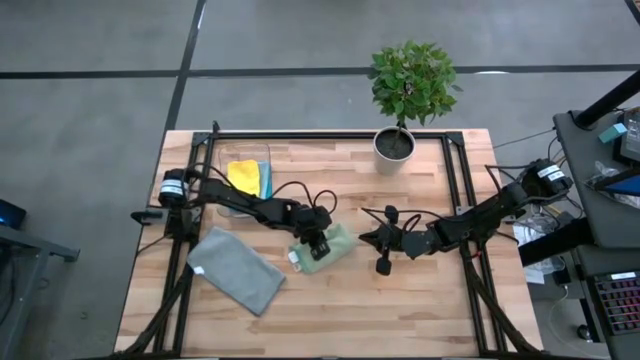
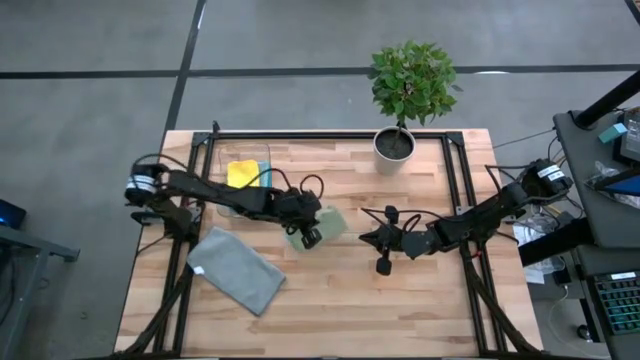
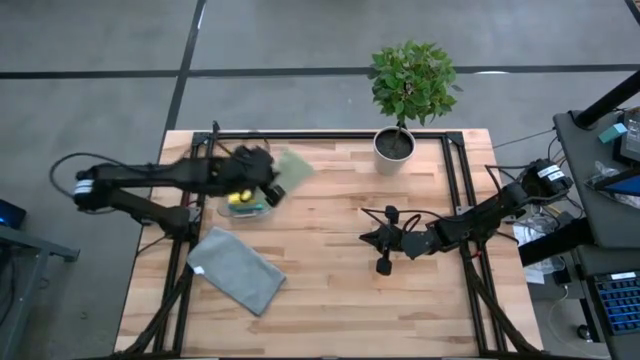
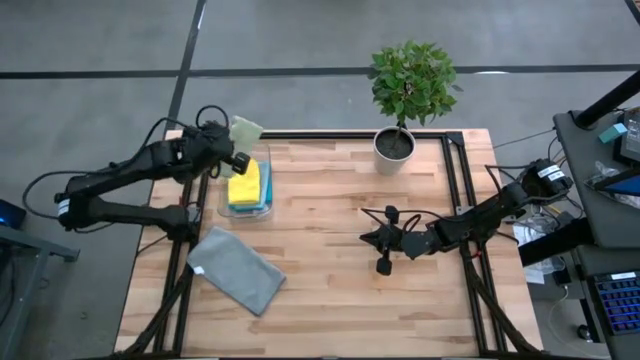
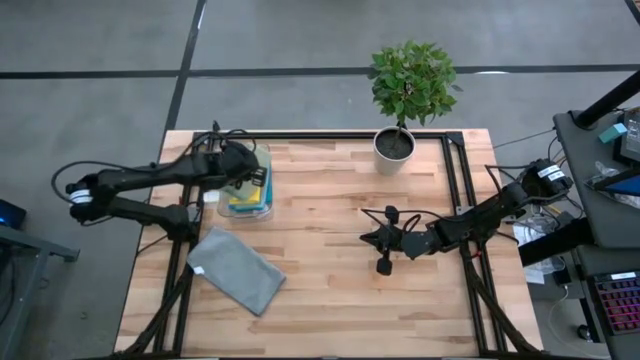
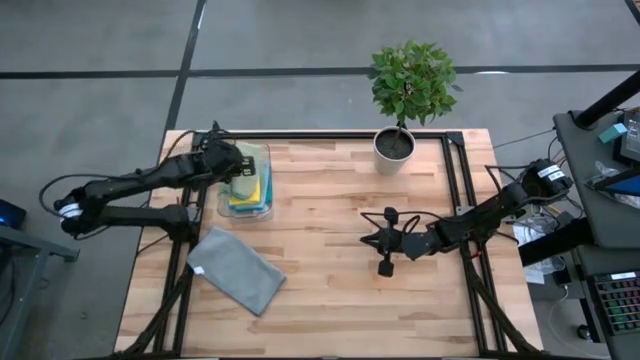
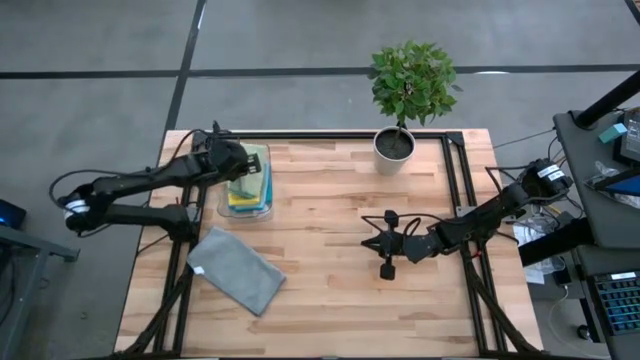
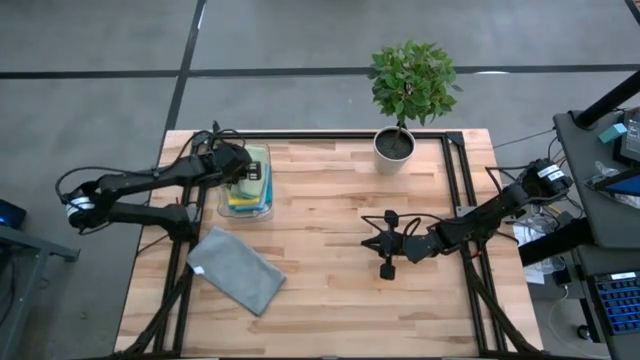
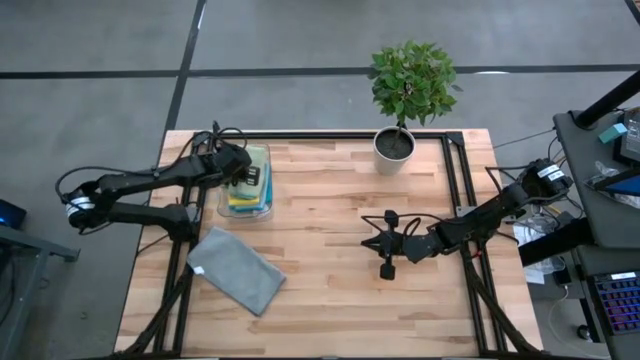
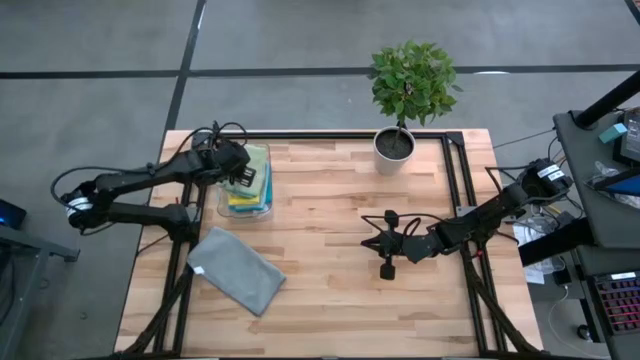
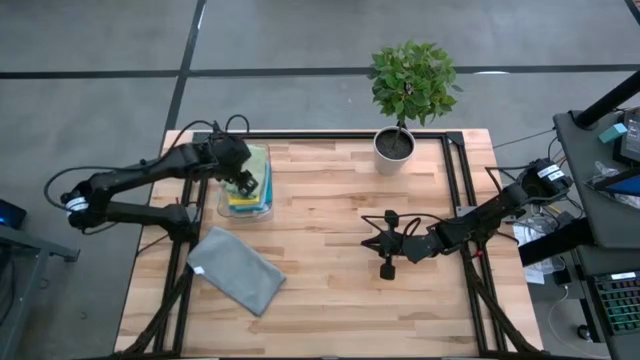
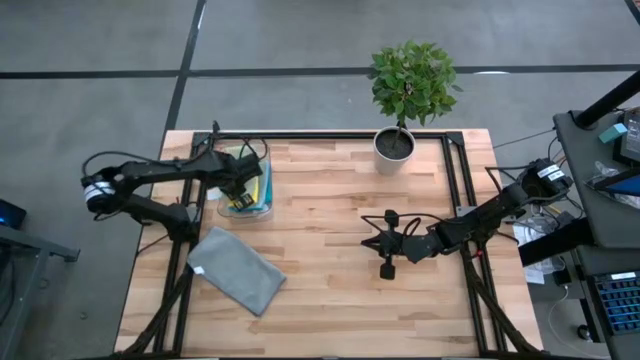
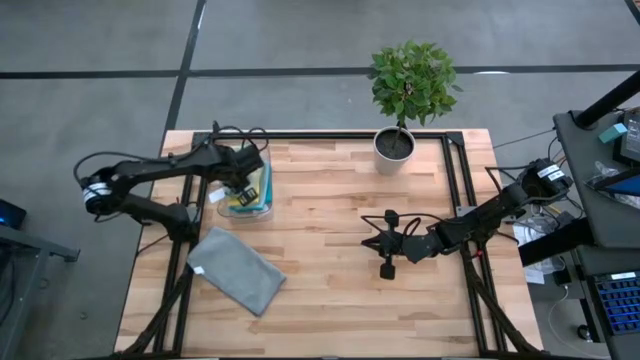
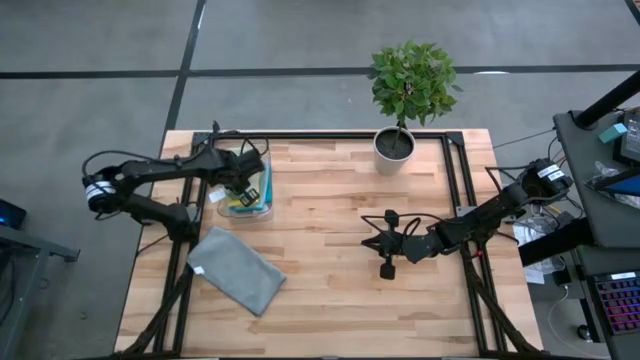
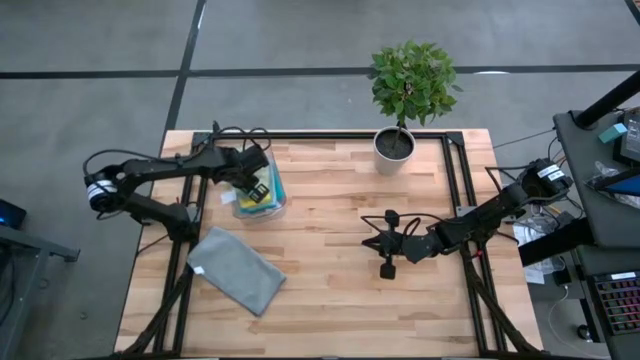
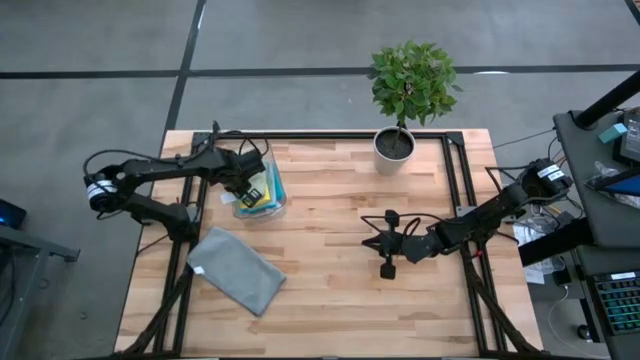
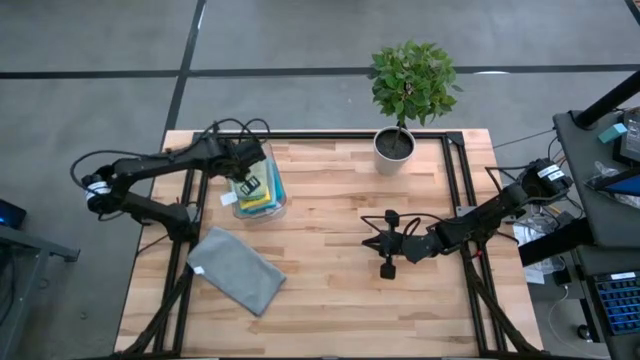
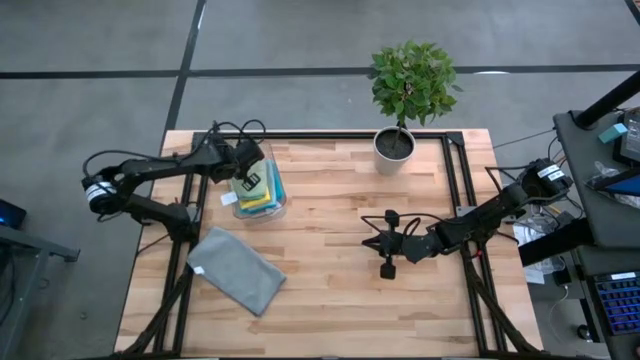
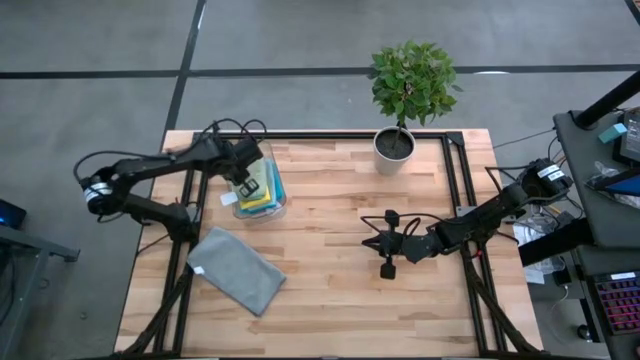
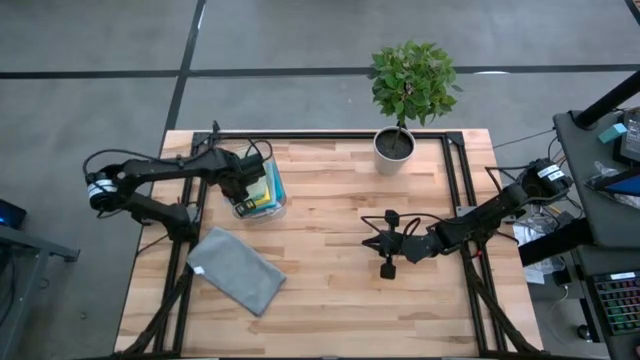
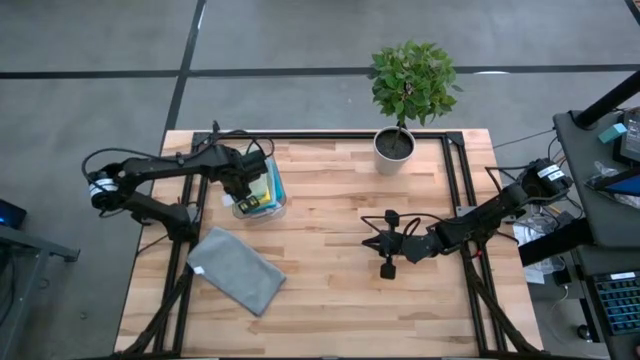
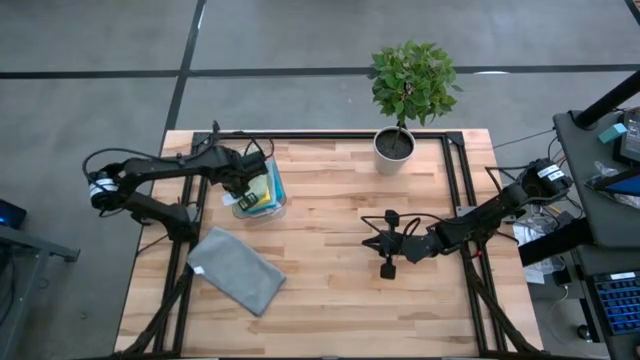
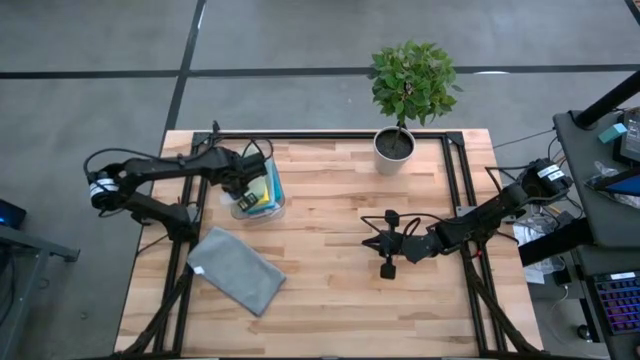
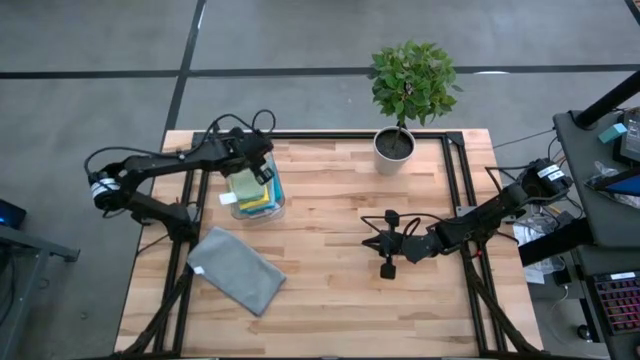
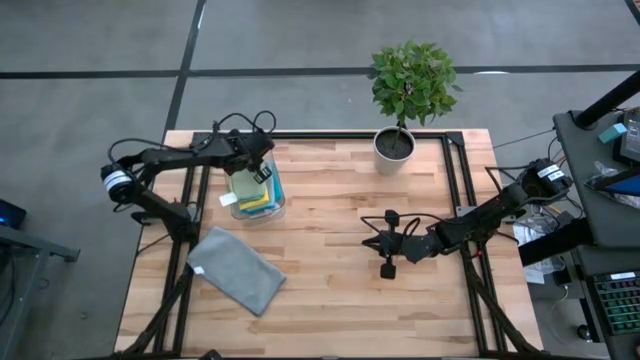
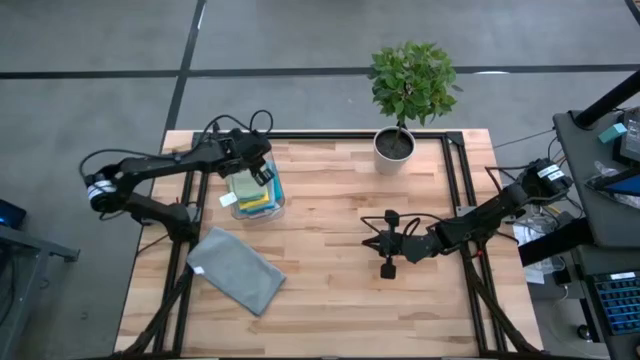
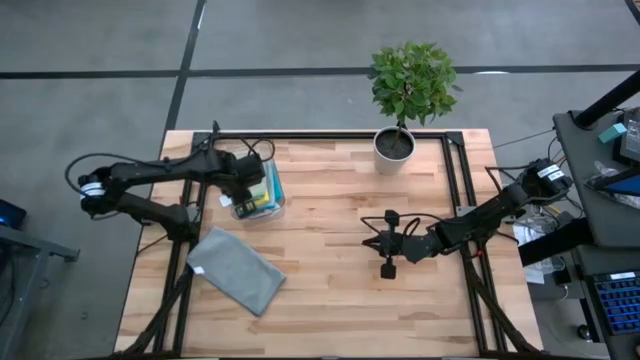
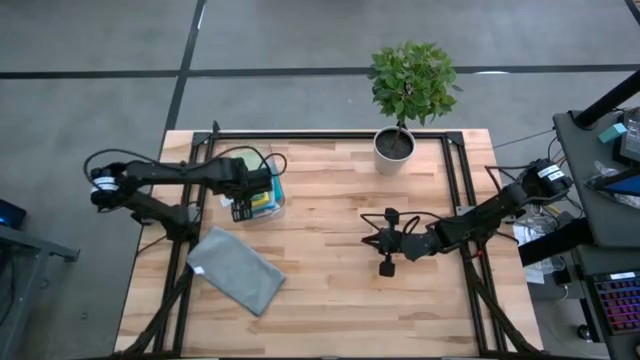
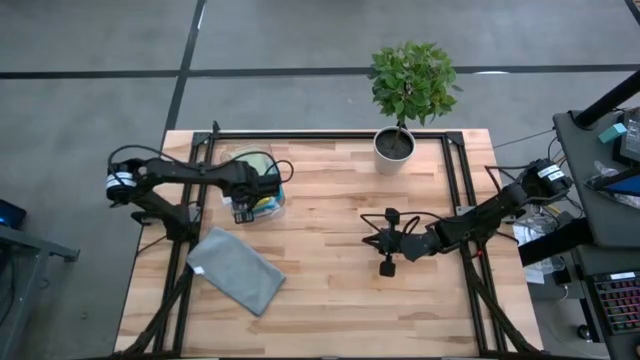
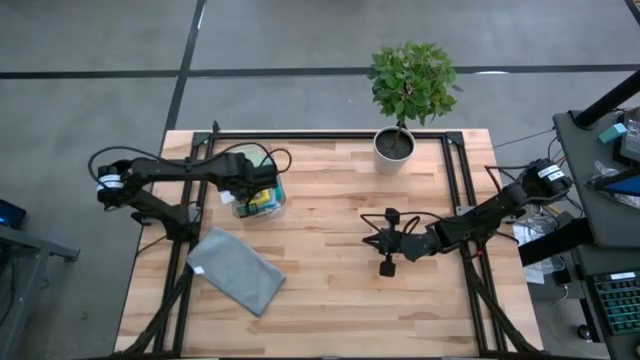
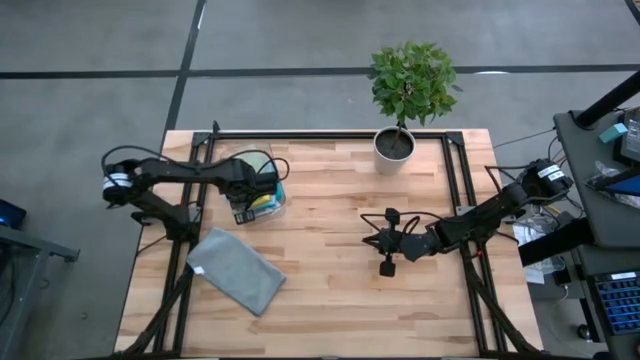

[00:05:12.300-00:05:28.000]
Task: Fold microfiber towels
Stack the folded light green microfiber towel on top of the yellow microfiber towel on the bin

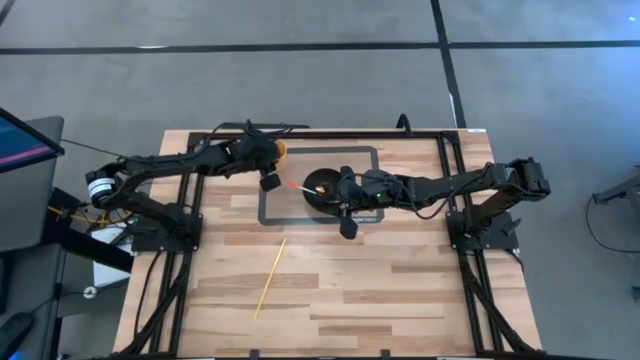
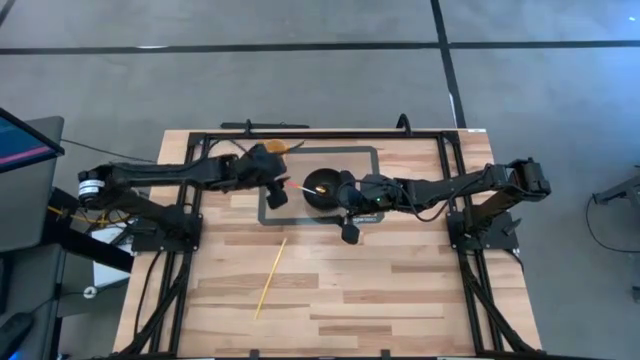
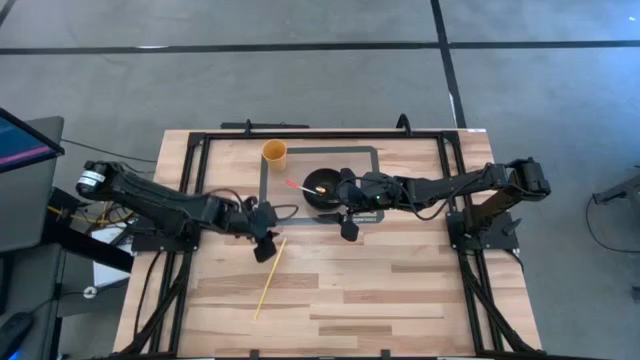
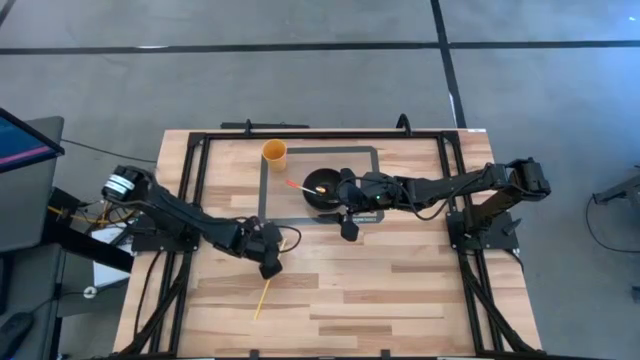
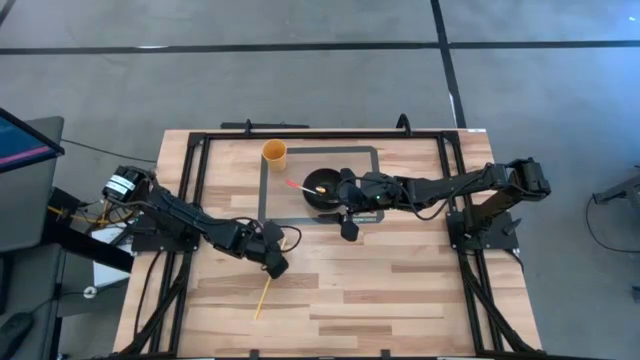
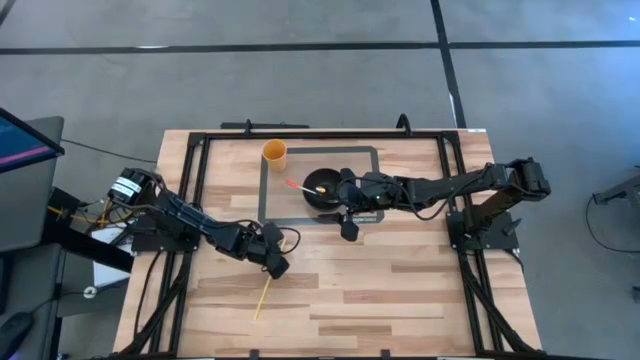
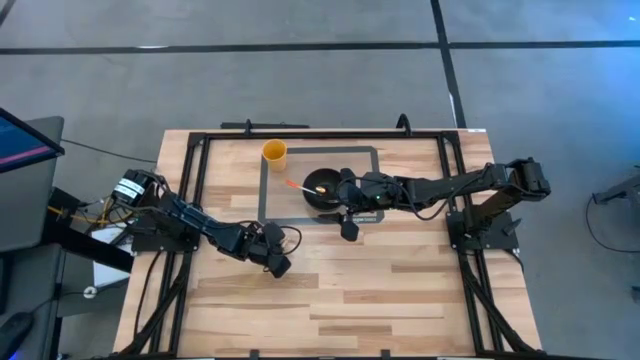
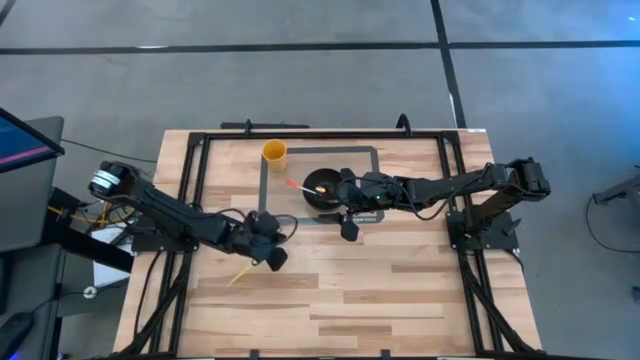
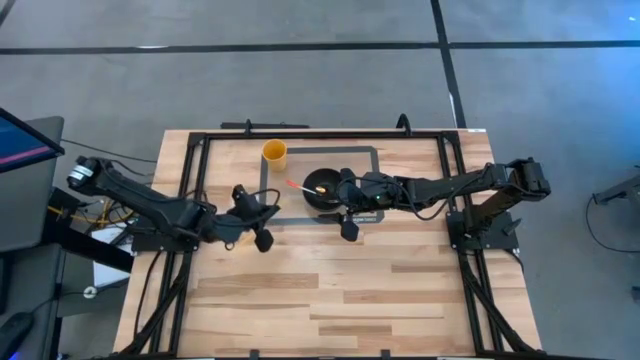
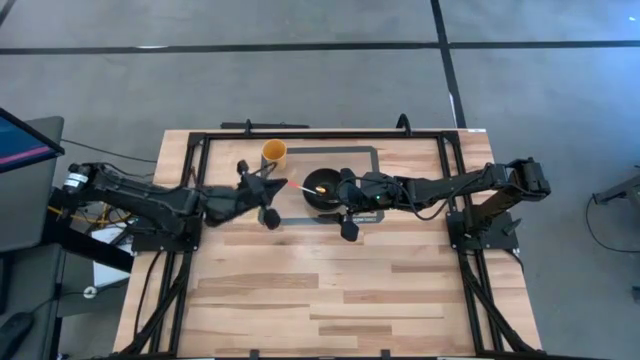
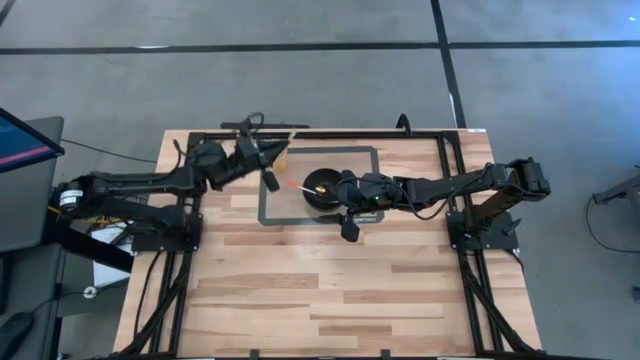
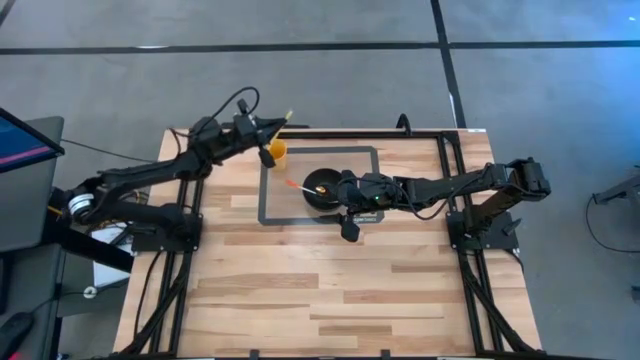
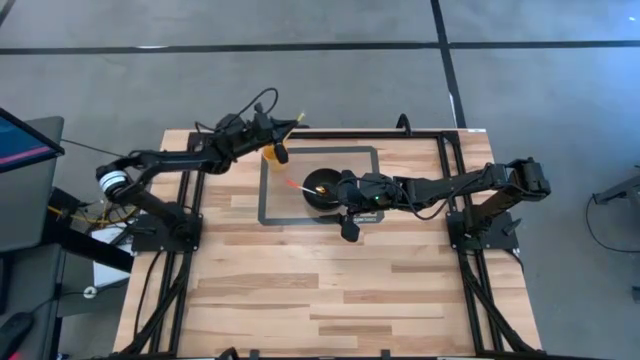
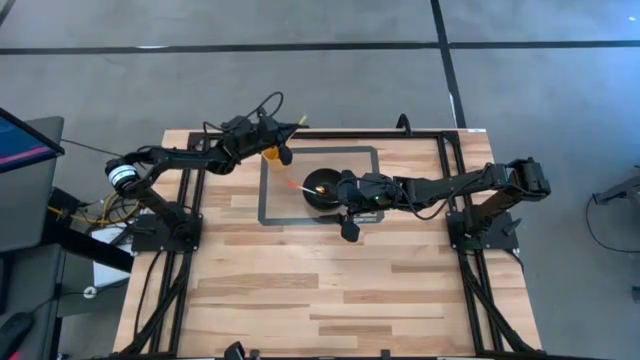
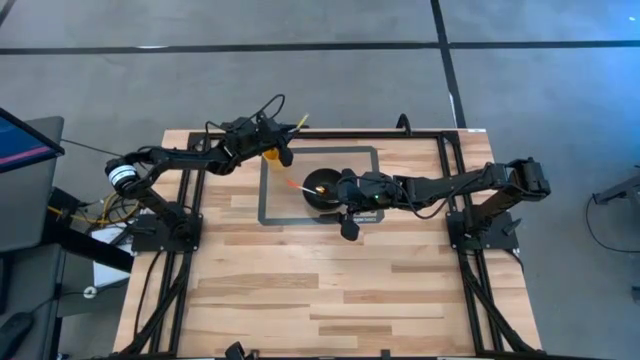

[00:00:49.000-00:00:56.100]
Task: Pick & Place Utensil
Put the yellow straw into the yellow cup
